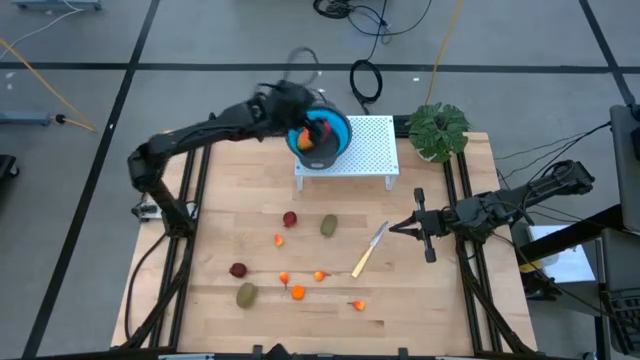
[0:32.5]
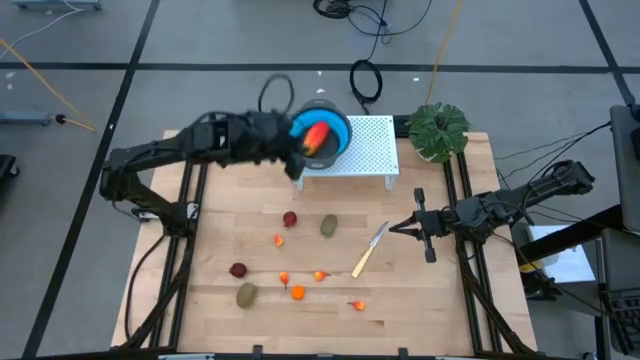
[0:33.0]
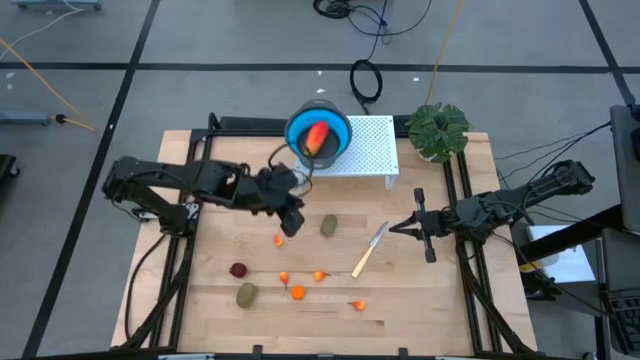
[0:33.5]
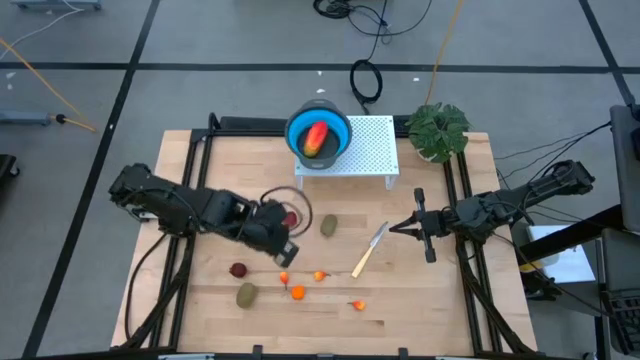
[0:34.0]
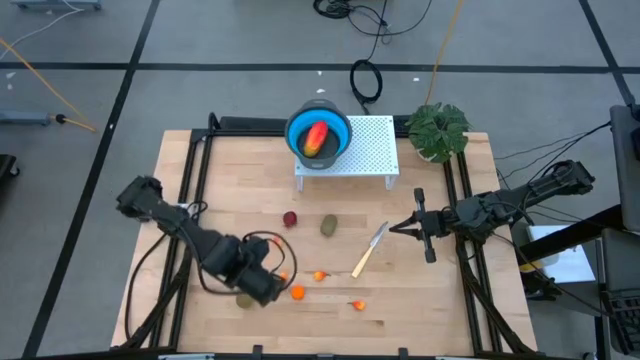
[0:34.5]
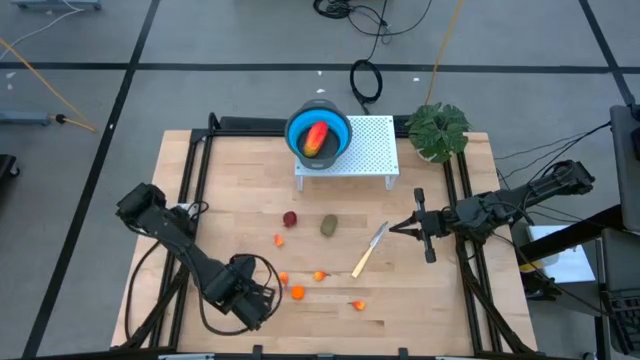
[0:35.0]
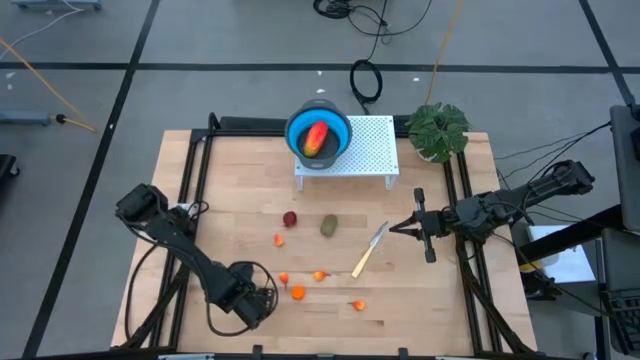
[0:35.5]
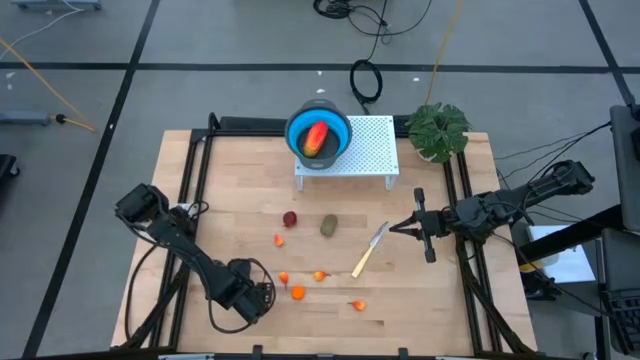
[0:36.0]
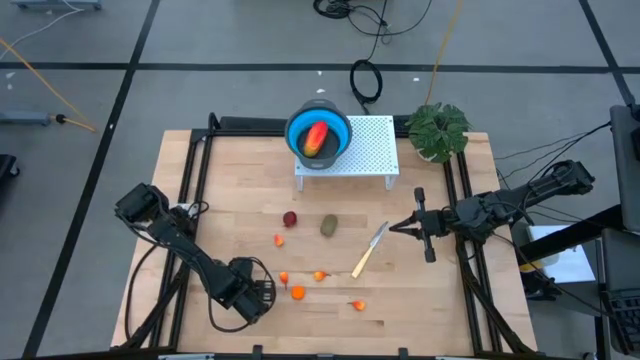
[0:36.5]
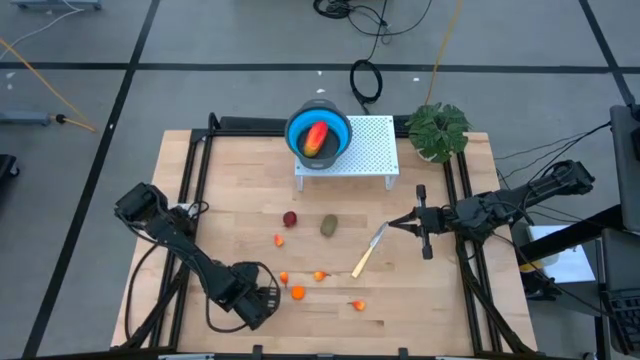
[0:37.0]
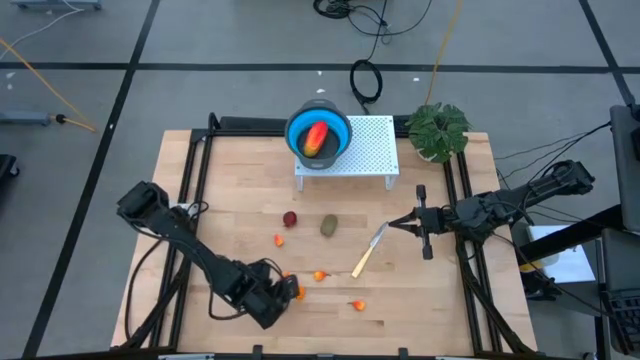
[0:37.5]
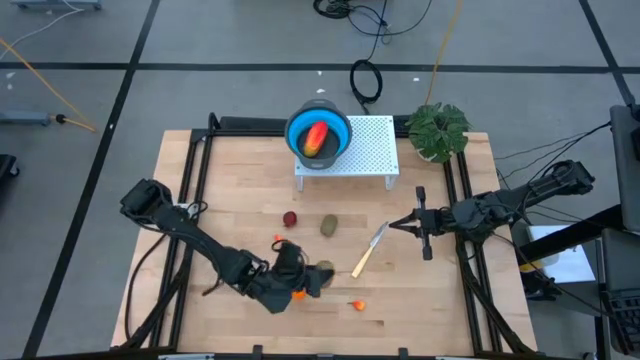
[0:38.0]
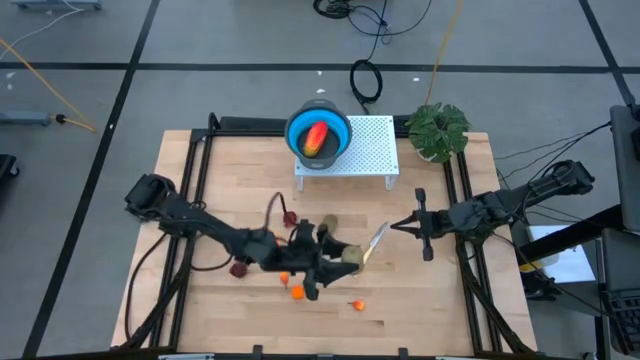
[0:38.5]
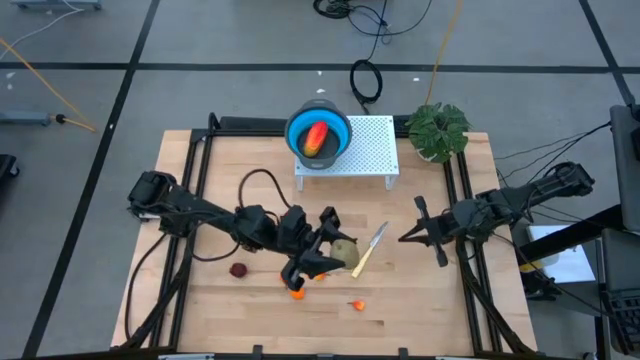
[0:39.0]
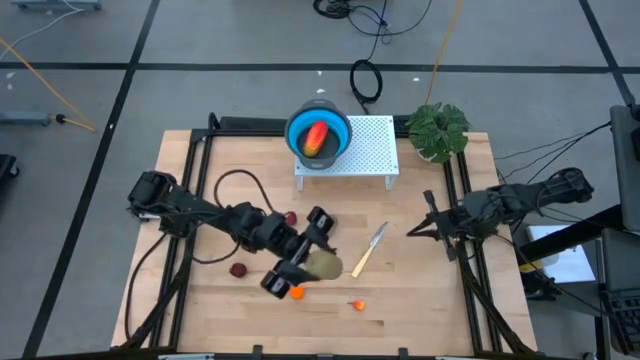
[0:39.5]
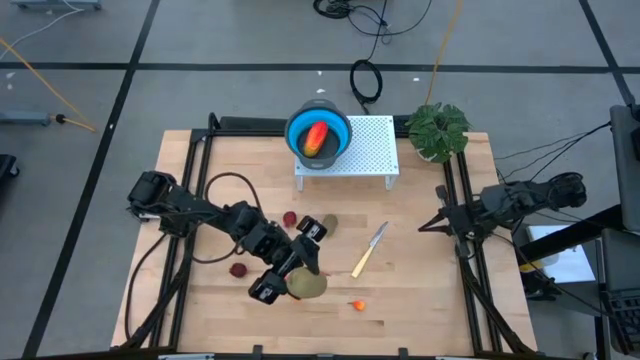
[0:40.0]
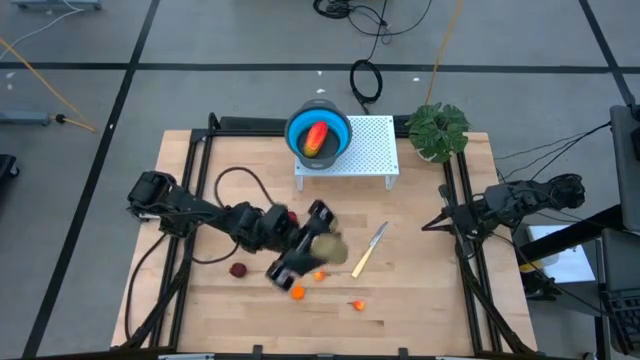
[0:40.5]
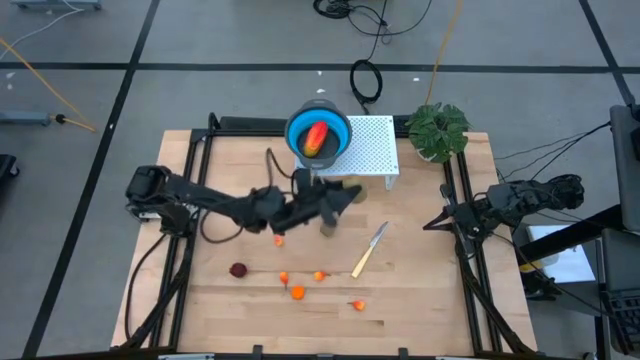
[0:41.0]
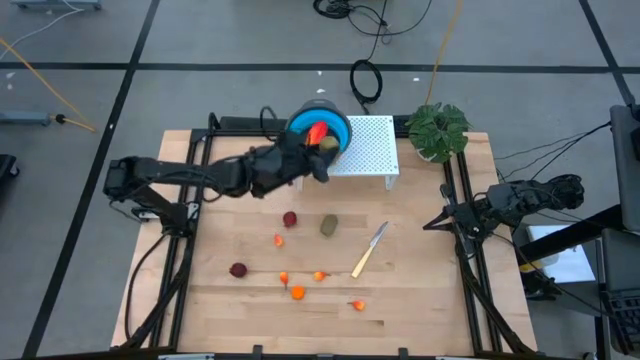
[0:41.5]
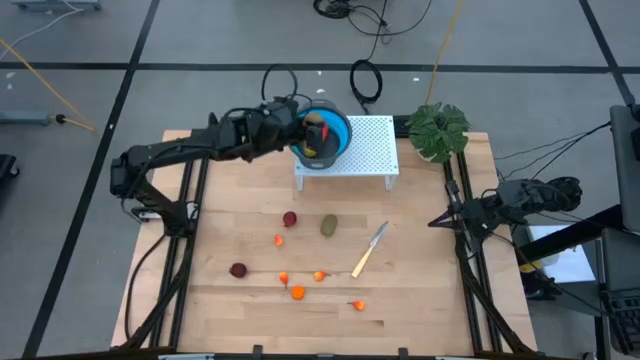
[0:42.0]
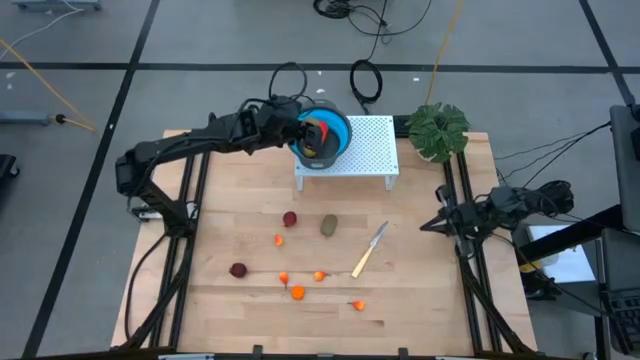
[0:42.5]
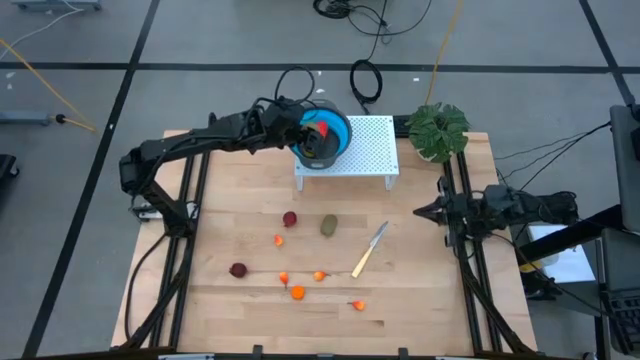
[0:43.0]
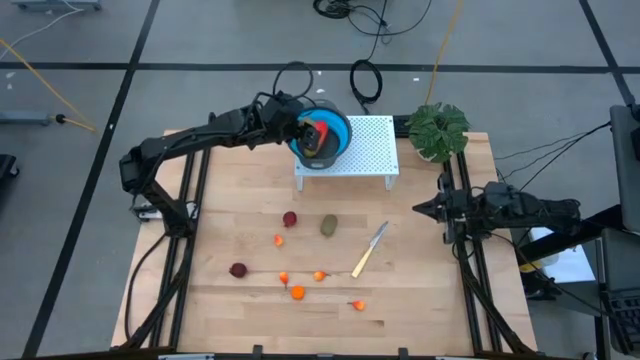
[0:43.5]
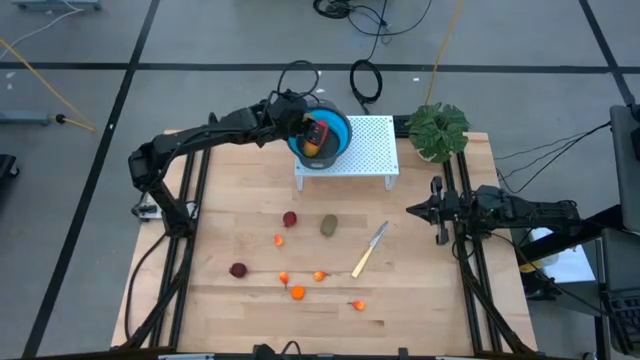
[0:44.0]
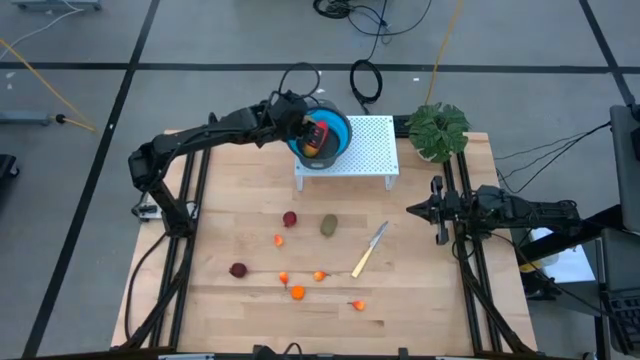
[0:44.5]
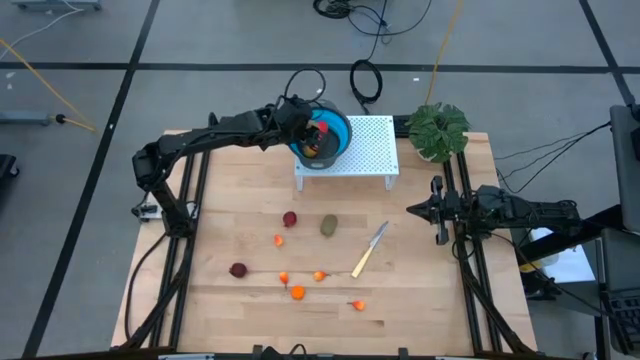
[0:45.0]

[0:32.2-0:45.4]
Task: Pick & Place Fruit
Put the green kiwi into the blue strainer bowl on the shelf

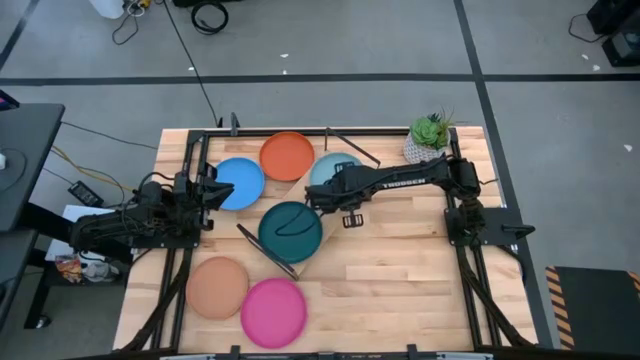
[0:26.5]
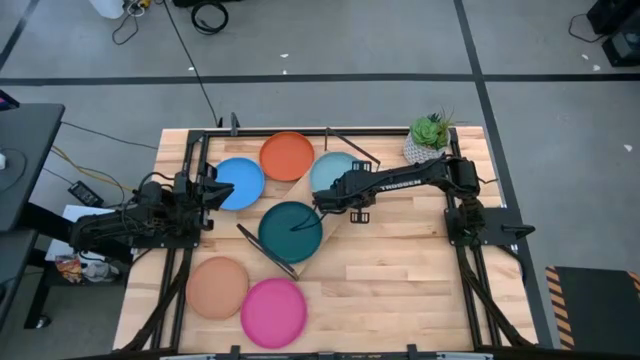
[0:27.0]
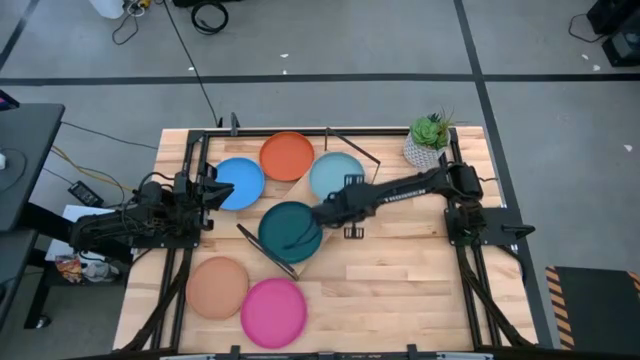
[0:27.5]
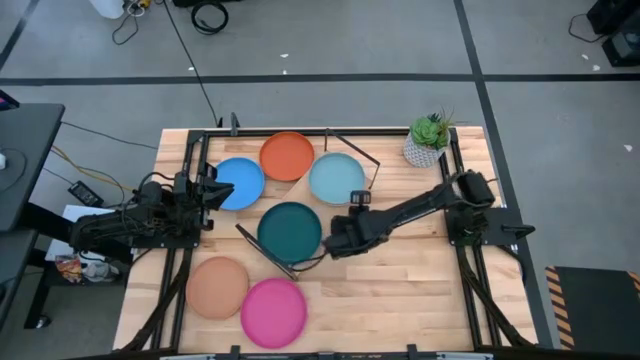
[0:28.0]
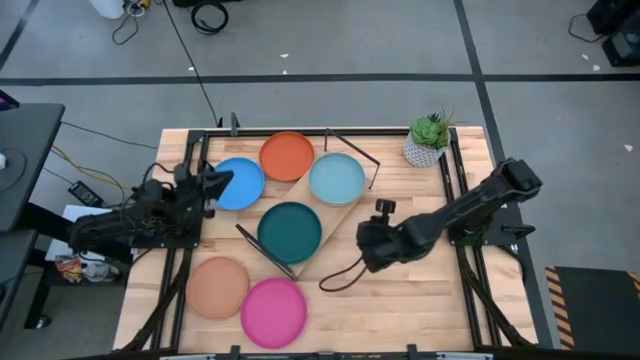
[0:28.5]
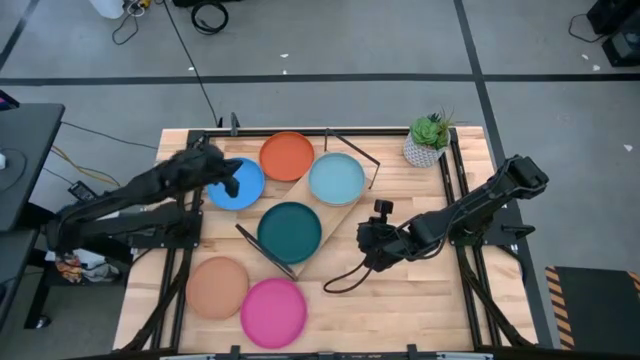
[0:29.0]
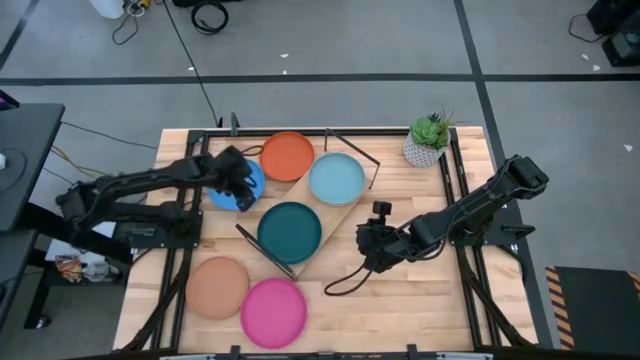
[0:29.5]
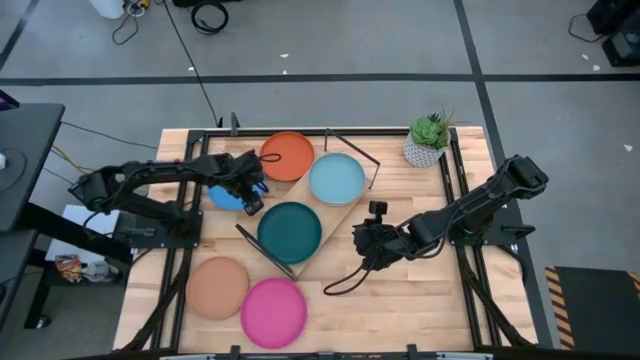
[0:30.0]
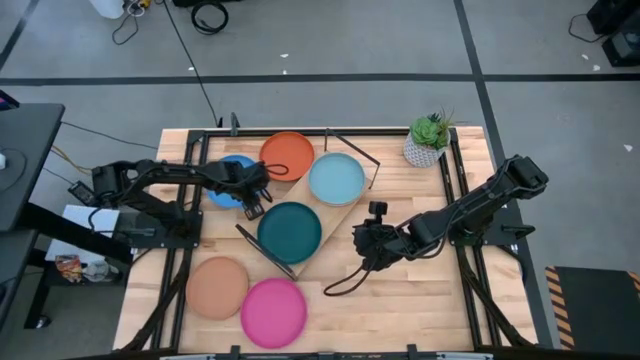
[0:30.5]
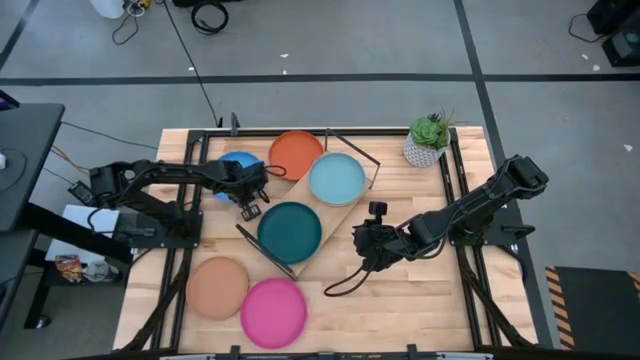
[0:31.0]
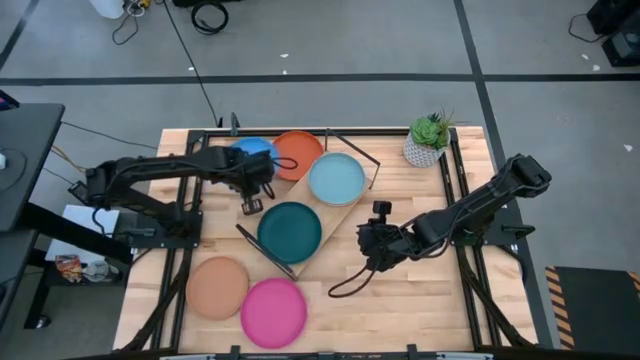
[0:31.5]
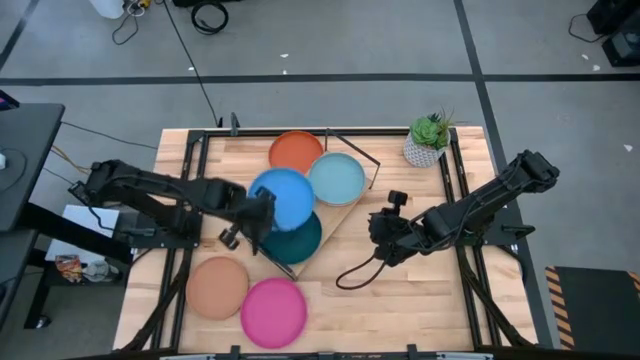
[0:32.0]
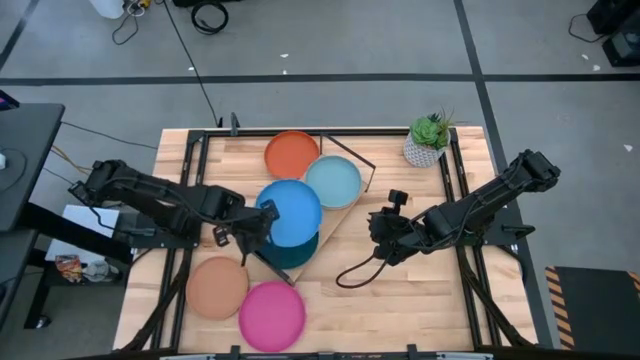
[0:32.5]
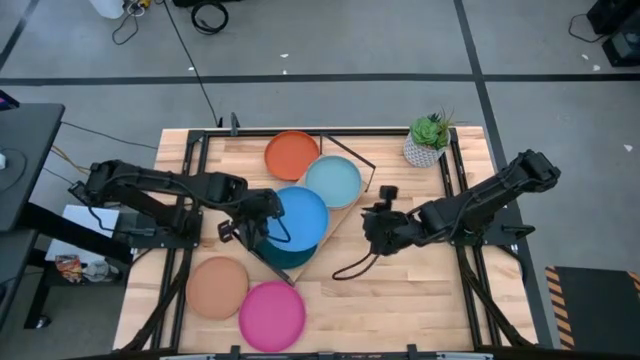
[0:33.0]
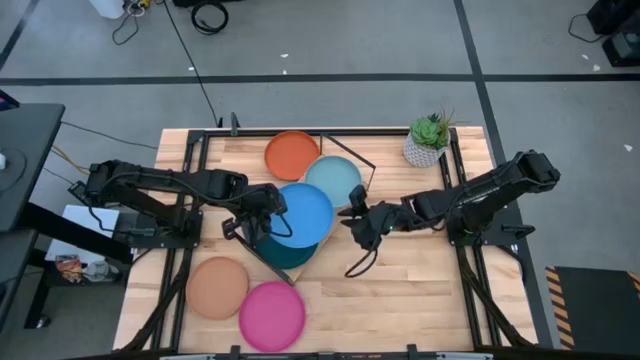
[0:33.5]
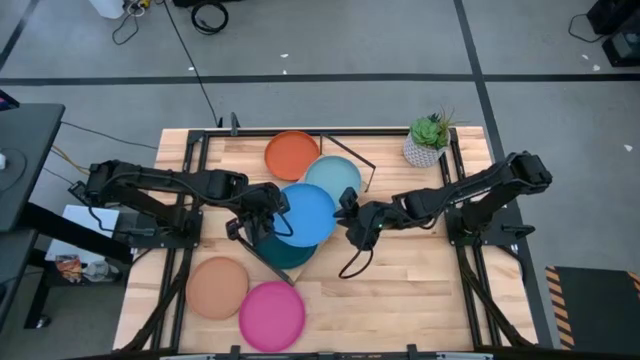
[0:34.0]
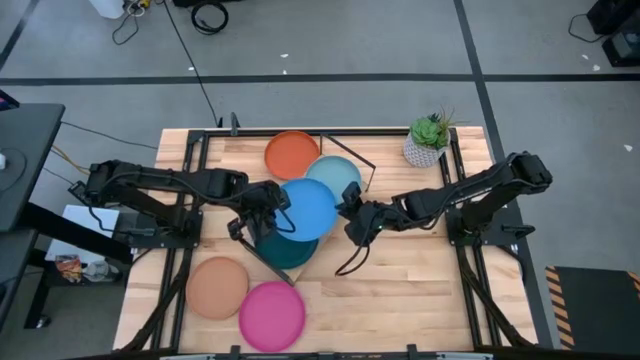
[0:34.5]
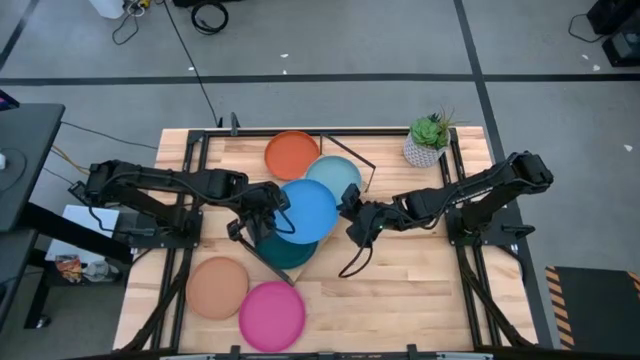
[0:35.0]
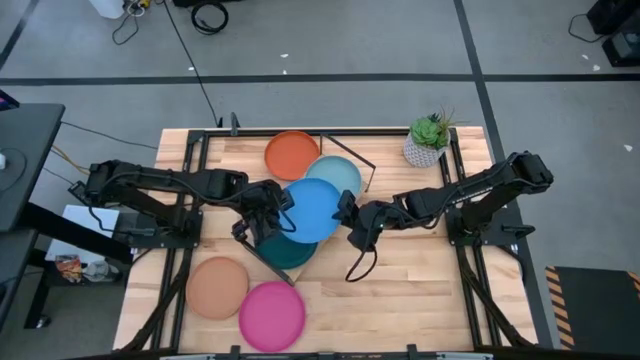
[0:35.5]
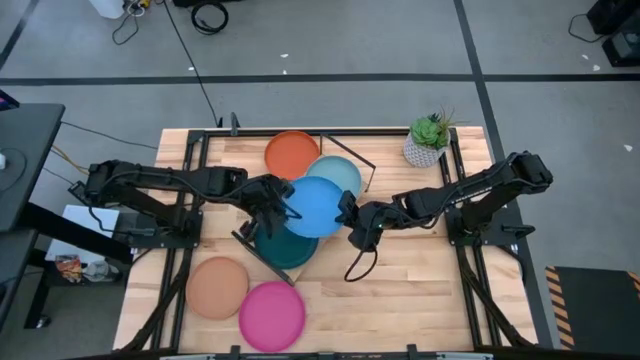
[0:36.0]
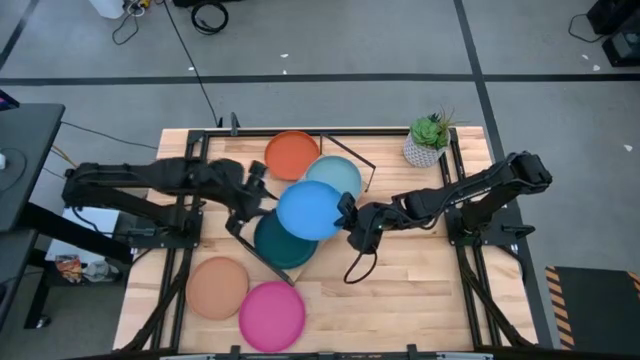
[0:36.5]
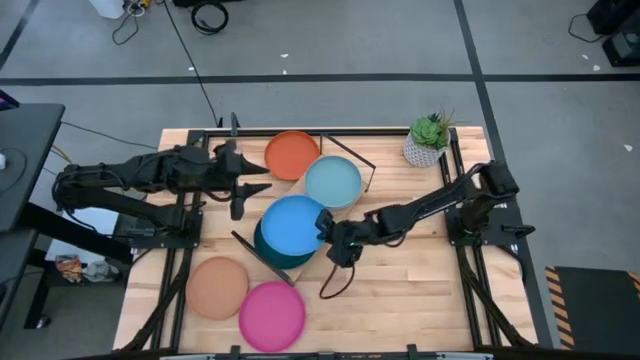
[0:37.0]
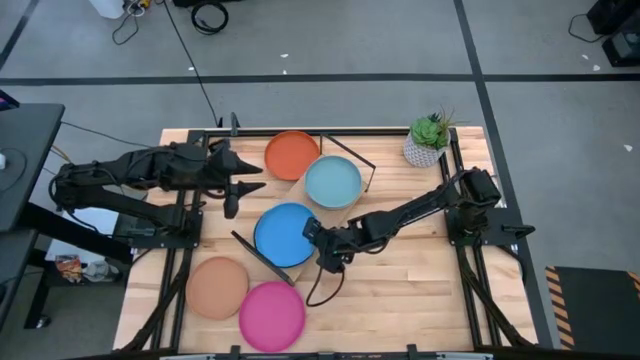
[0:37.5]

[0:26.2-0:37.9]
Task: Place and stack plates onto a shelf
Stack the blue plate on top of the green plate on the shelf
